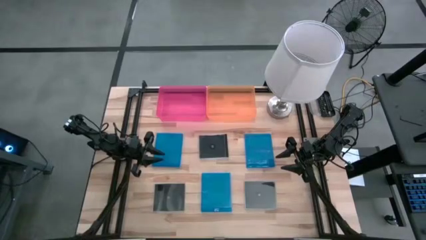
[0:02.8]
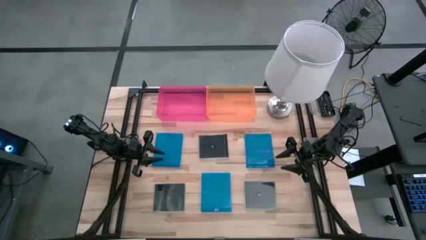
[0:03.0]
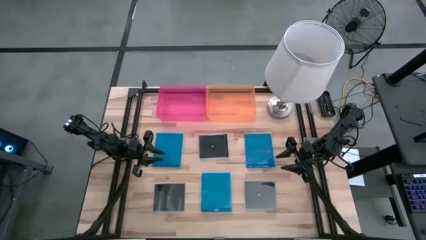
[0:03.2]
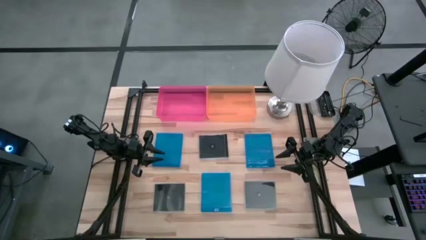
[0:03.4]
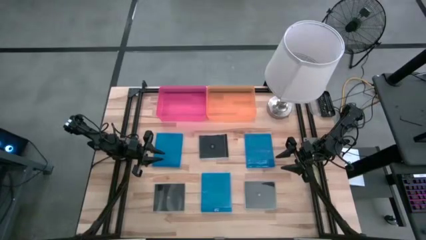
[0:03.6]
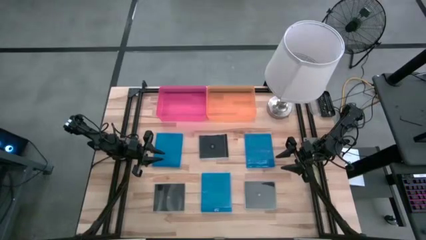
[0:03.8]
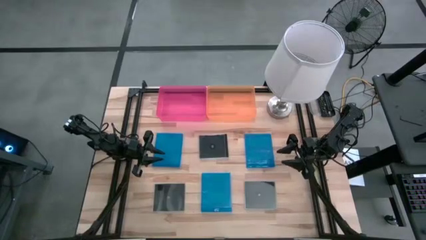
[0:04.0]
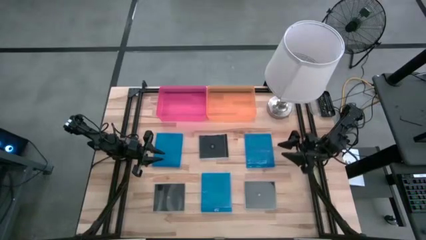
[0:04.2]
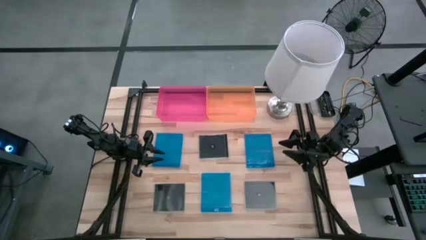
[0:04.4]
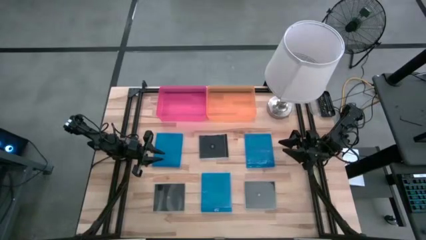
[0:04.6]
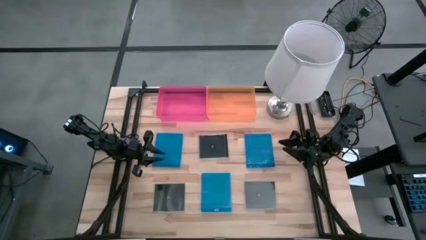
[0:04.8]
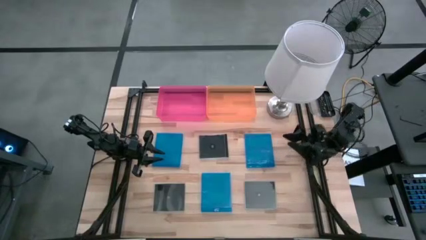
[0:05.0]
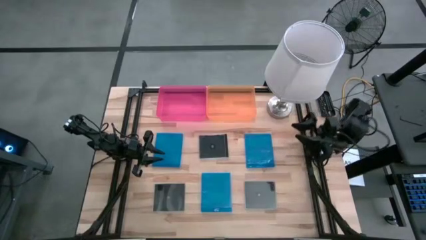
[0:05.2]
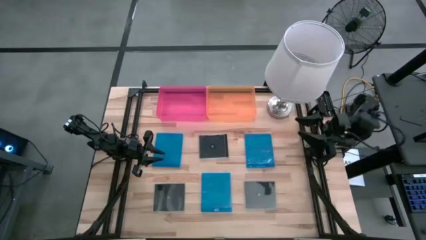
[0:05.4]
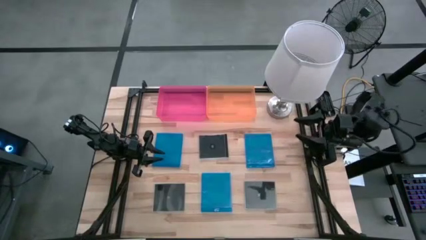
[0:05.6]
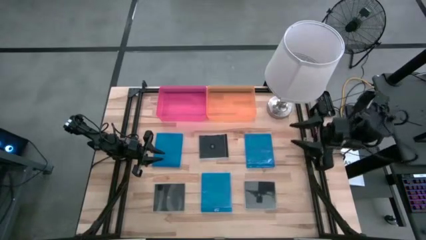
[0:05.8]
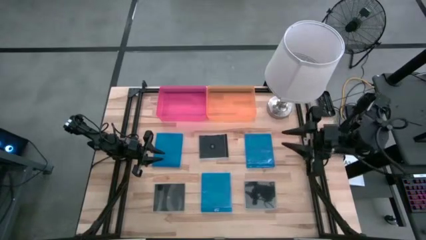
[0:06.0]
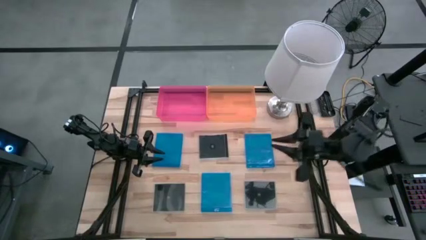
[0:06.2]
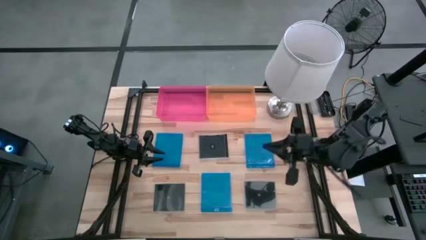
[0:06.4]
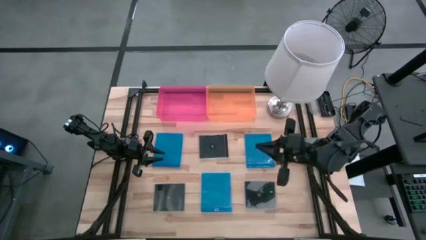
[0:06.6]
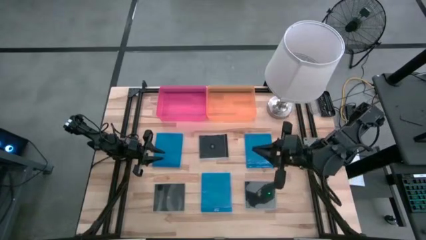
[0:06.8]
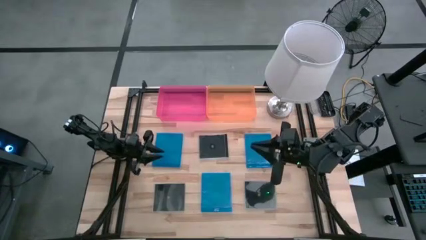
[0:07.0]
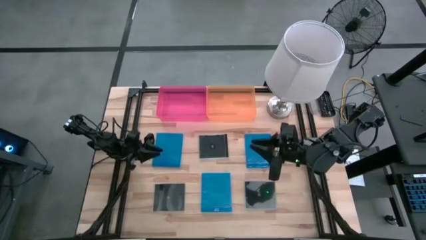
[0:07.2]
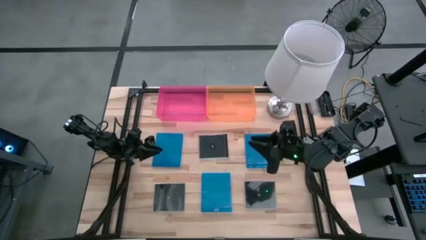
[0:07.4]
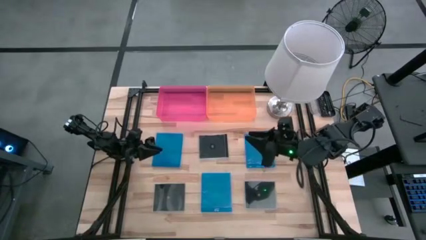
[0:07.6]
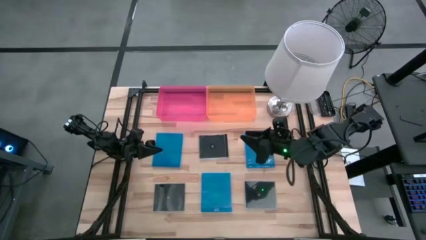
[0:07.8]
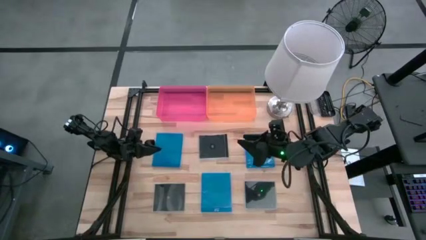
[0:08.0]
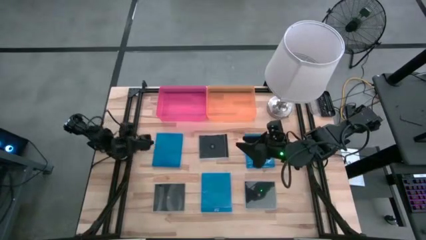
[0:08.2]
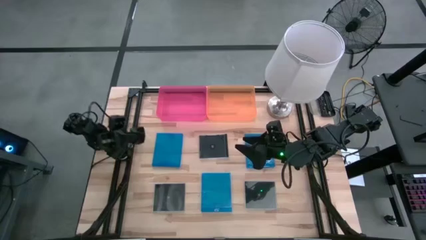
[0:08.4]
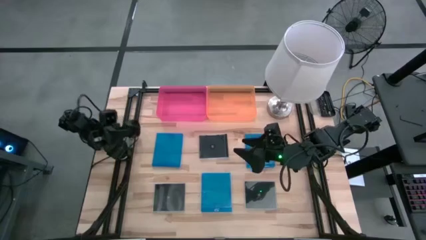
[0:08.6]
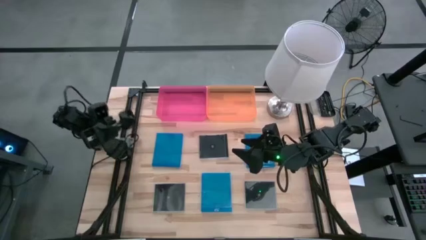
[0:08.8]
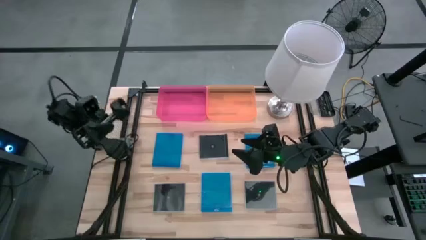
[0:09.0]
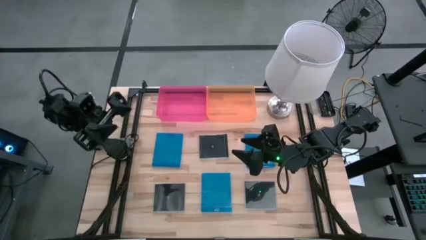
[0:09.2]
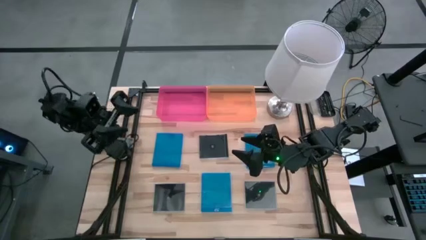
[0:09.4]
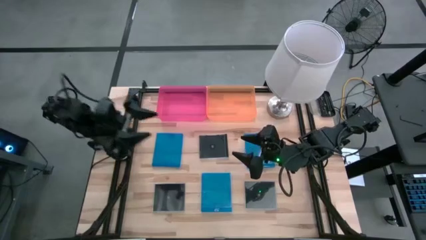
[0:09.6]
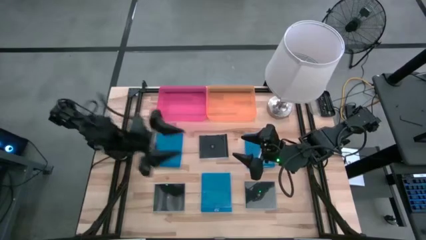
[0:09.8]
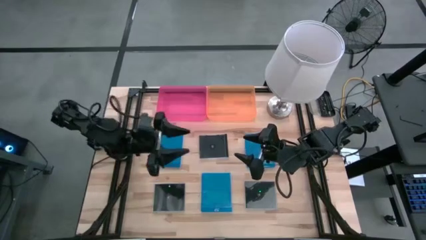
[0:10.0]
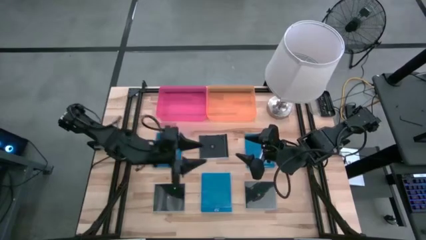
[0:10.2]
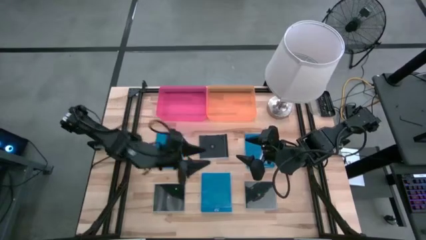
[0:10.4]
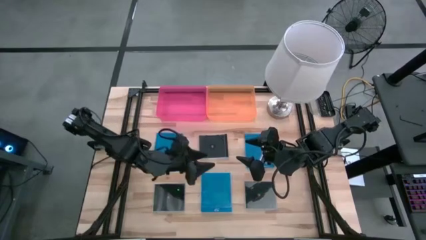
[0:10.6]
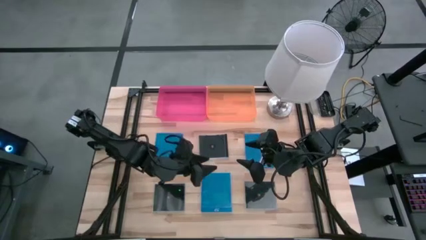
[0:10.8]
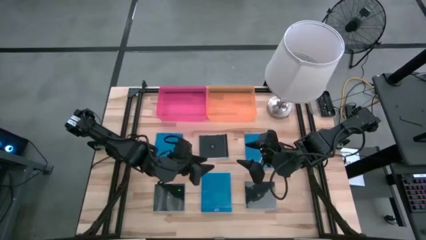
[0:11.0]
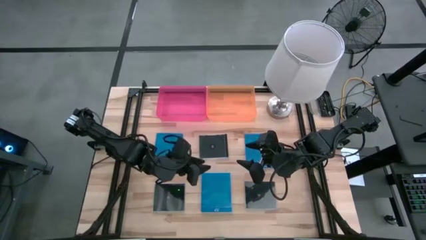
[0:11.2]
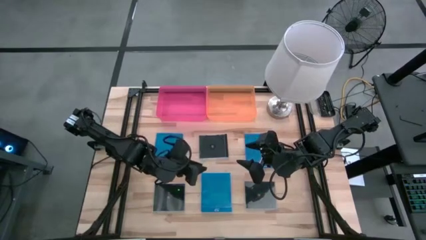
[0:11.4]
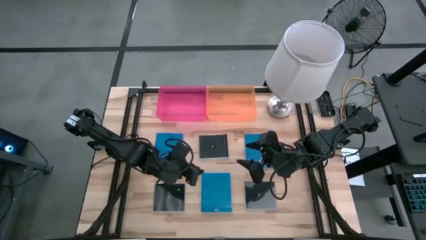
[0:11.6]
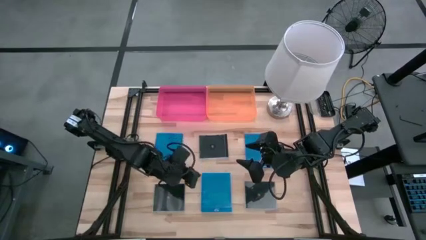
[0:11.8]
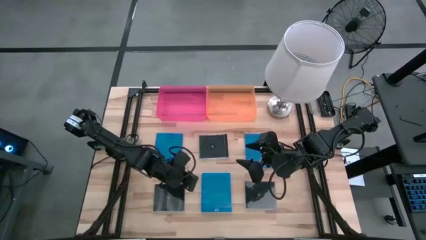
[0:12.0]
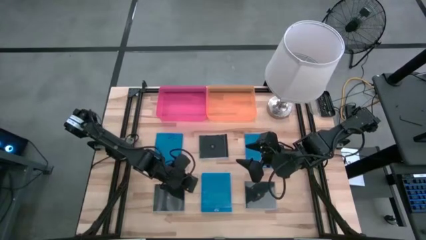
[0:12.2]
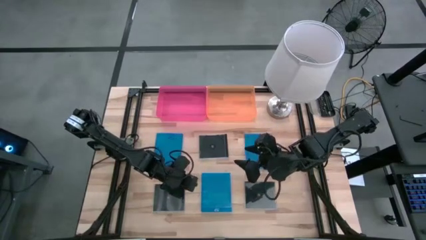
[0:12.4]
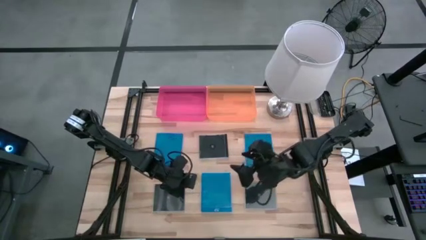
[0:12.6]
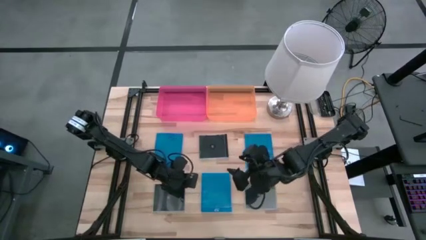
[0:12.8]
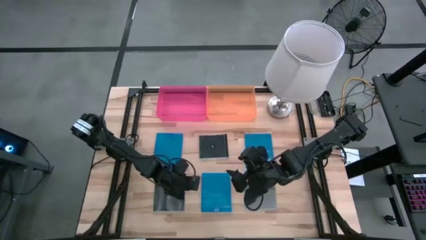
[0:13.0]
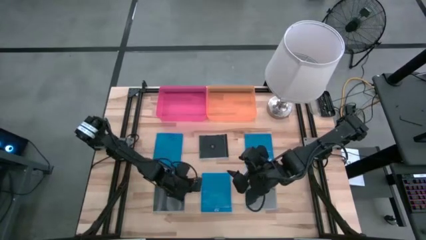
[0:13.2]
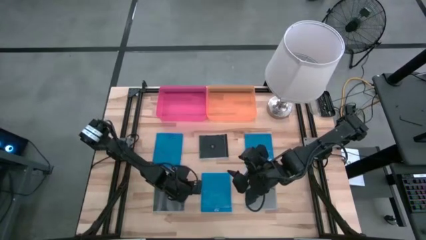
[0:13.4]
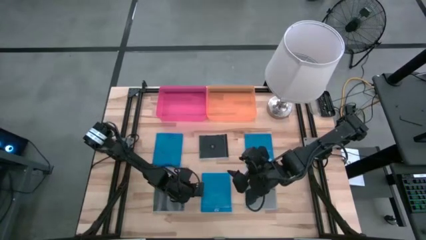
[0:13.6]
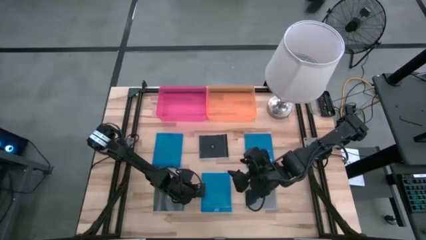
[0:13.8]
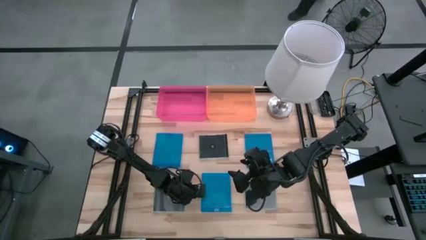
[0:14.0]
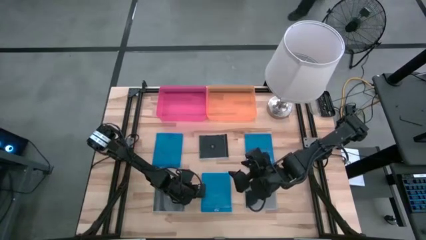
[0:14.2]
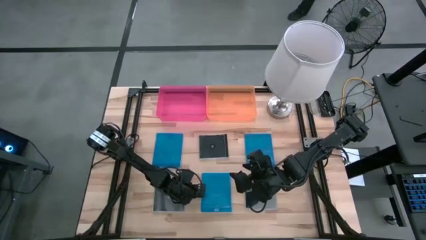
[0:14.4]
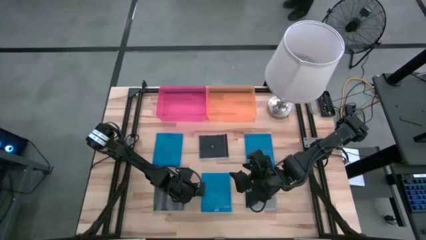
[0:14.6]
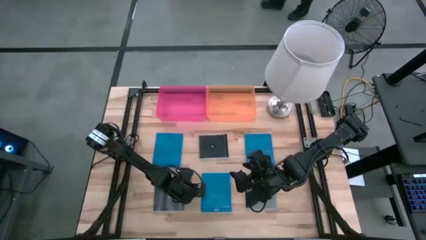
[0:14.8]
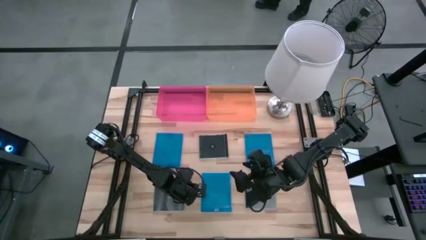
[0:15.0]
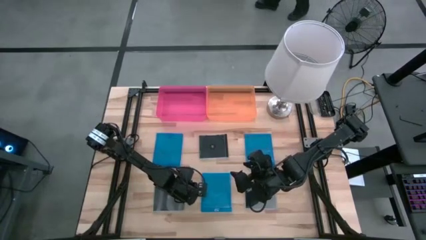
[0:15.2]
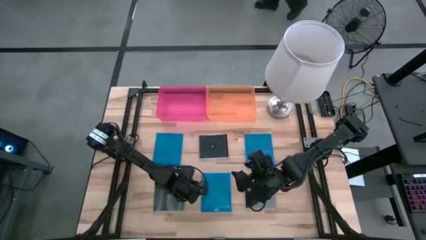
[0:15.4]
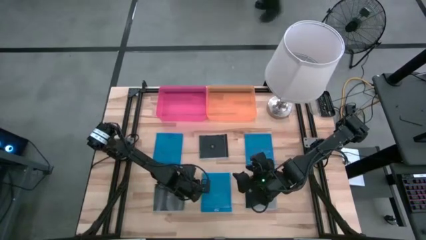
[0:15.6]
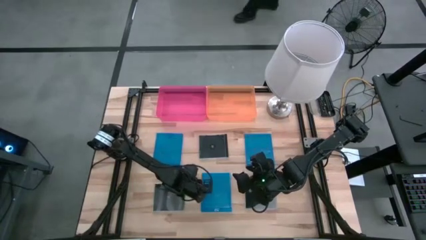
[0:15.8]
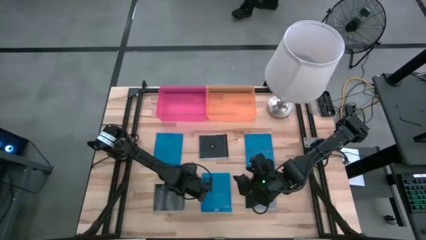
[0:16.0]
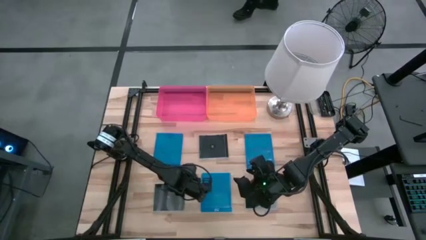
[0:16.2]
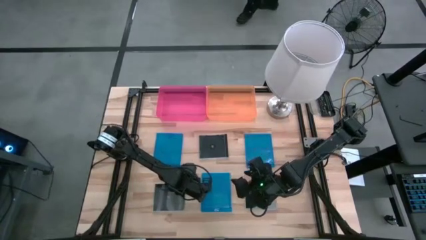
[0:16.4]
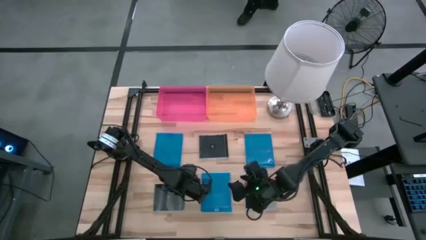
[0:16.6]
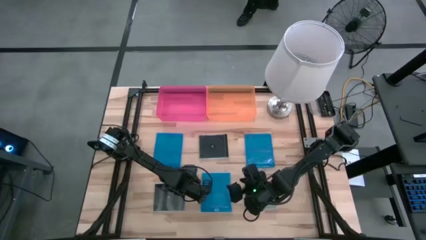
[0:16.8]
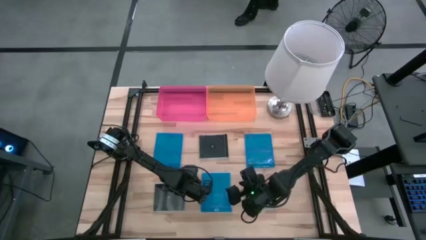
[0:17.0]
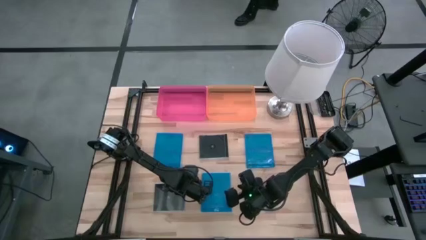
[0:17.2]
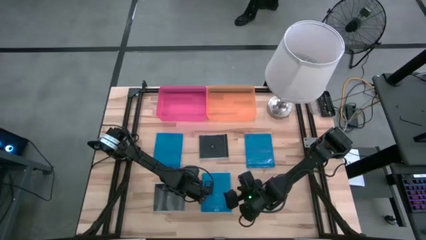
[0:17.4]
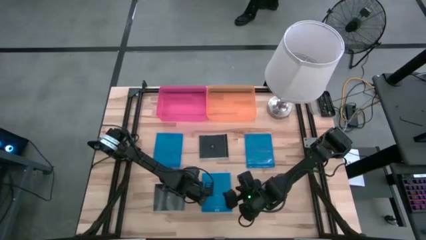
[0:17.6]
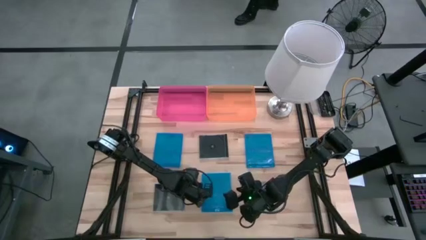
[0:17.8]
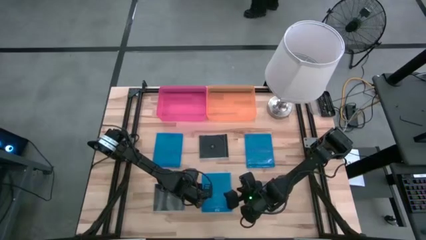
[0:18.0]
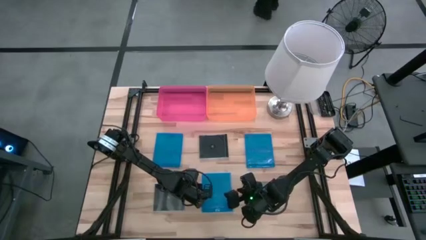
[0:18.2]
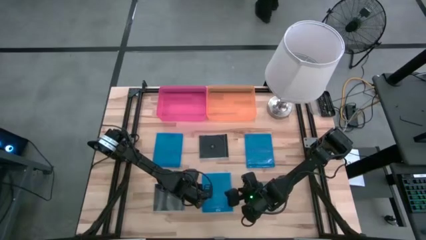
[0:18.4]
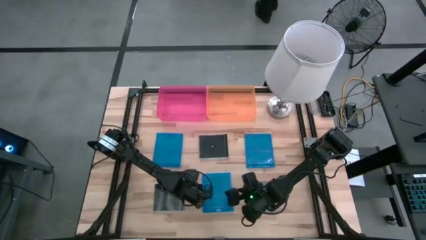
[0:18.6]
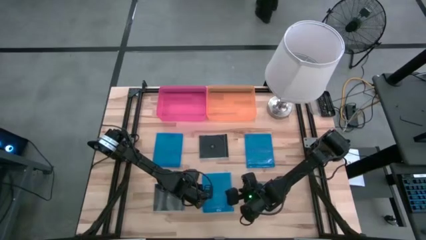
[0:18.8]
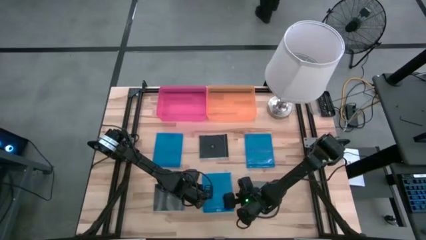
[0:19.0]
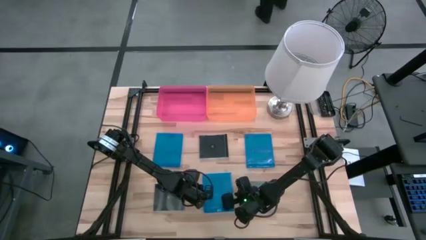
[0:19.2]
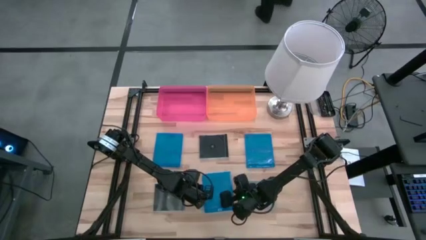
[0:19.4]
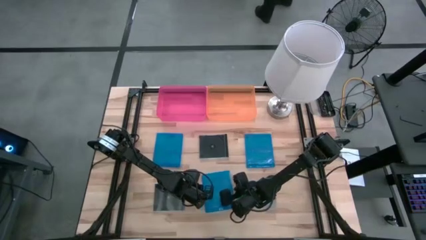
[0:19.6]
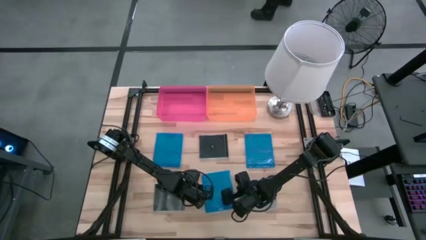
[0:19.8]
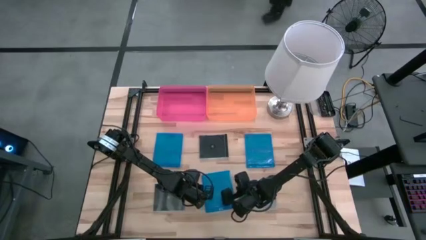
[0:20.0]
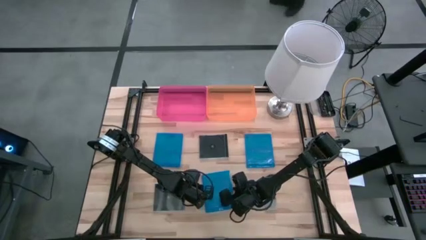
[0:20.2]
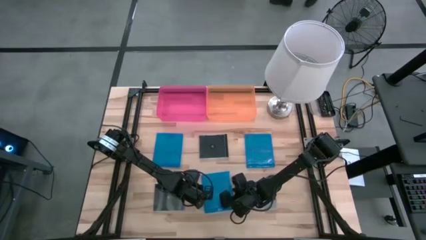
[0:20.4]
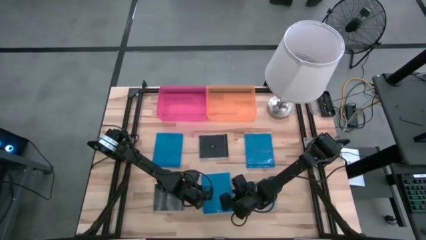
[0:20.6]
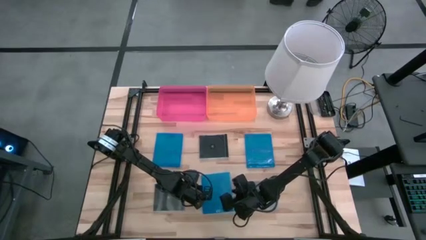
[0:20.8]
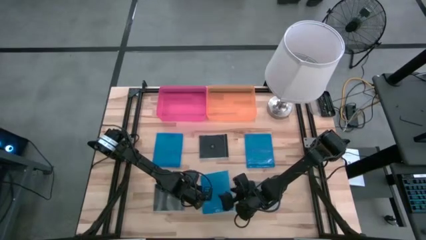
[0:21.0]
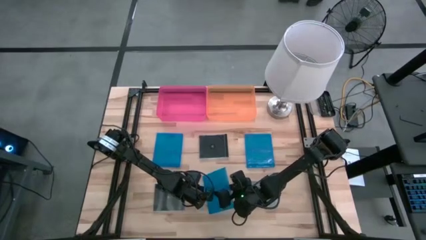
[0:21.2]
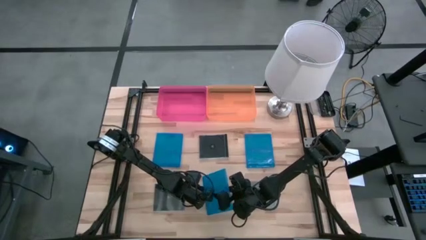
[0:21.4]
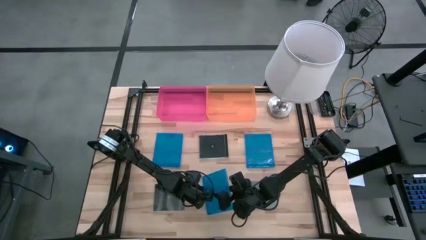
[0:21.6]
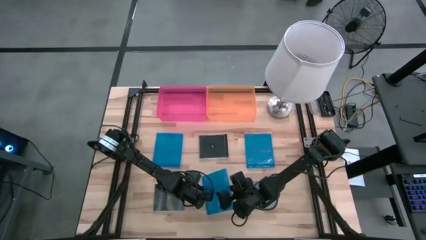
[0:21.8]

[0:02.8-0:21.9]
Task: Pick & place jewel cases by type
Put the bottom blue CD case into the orange bin
